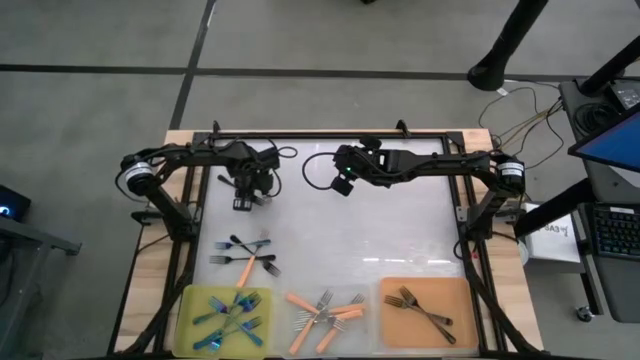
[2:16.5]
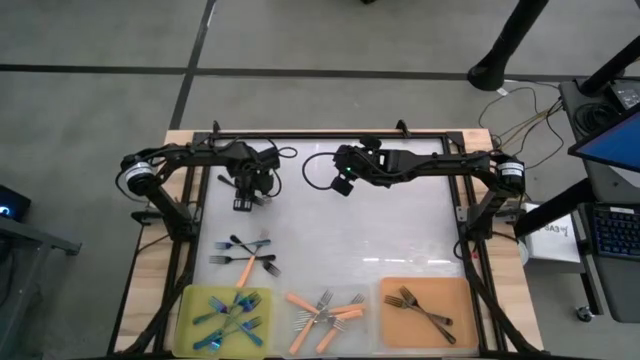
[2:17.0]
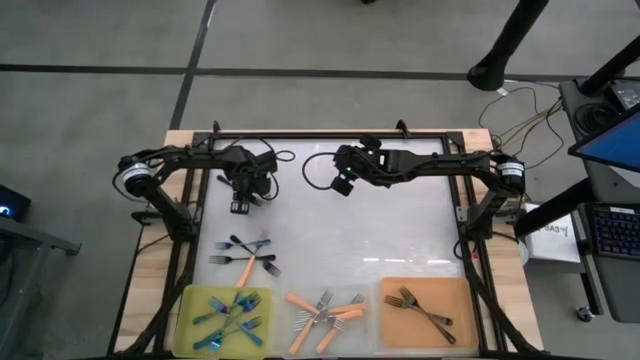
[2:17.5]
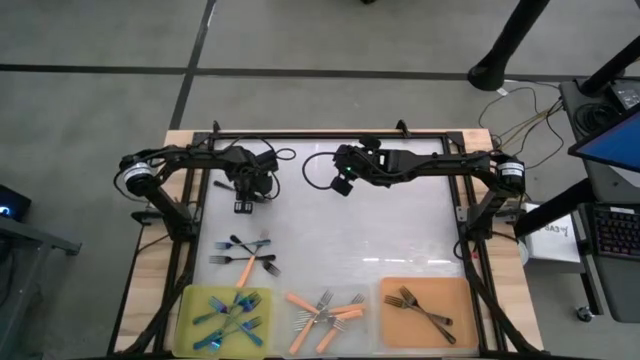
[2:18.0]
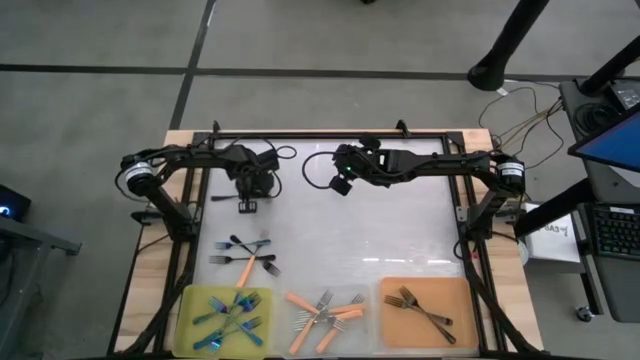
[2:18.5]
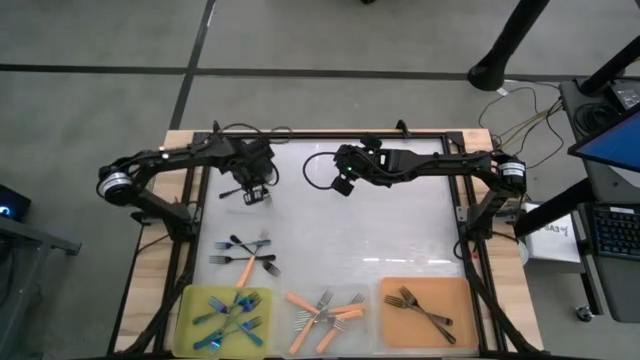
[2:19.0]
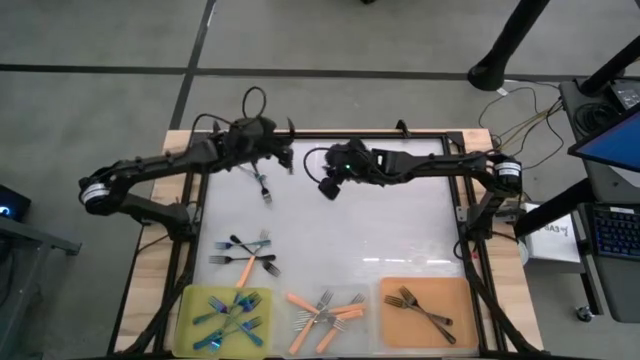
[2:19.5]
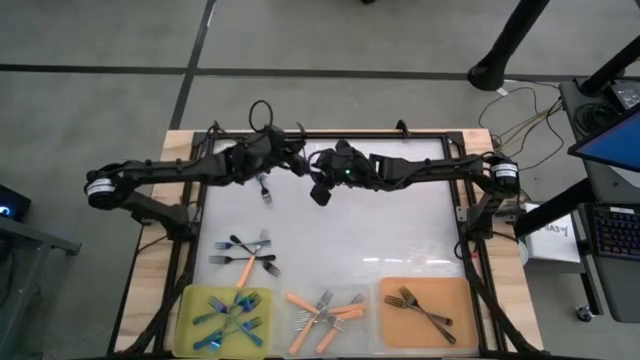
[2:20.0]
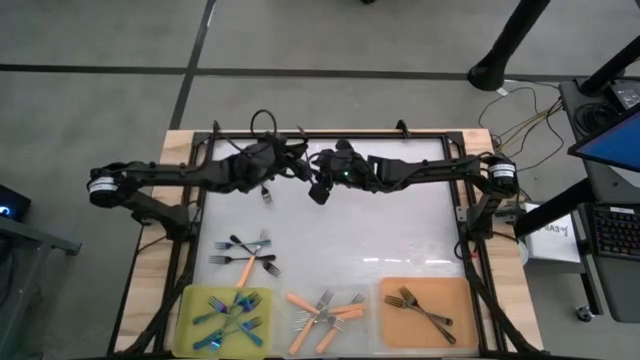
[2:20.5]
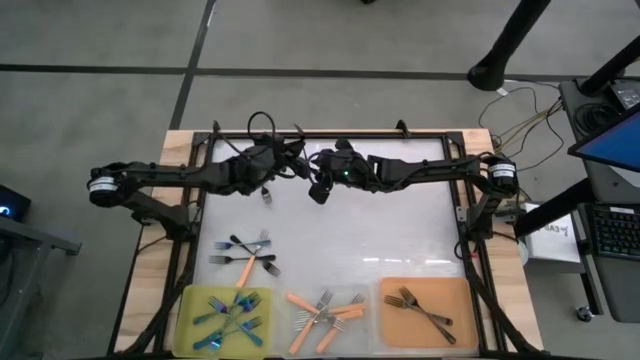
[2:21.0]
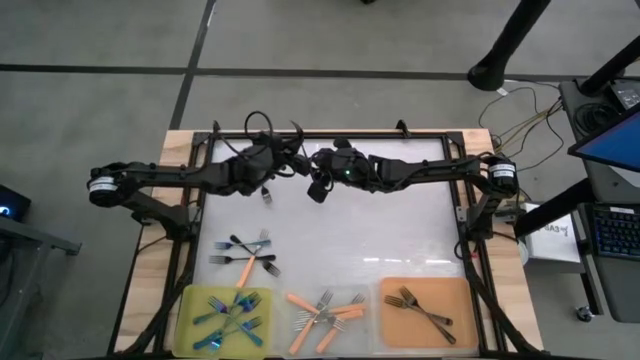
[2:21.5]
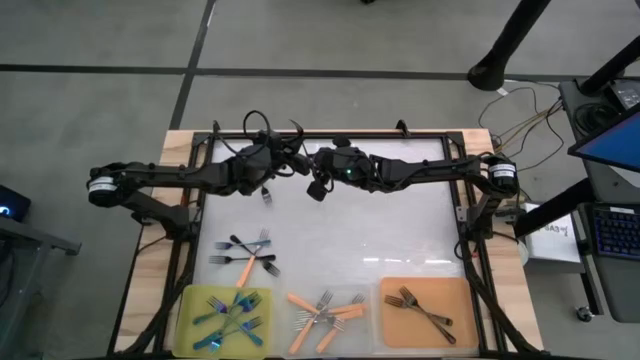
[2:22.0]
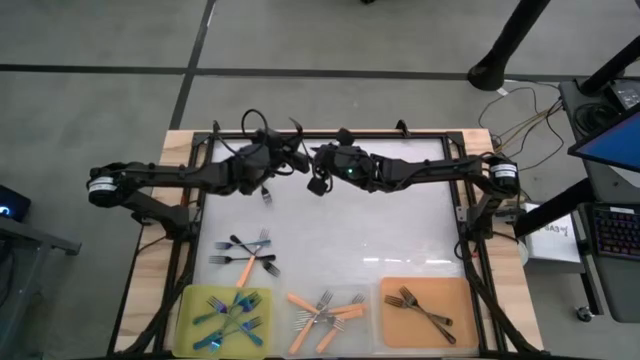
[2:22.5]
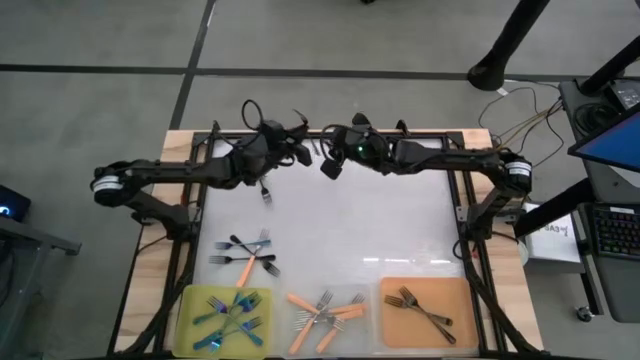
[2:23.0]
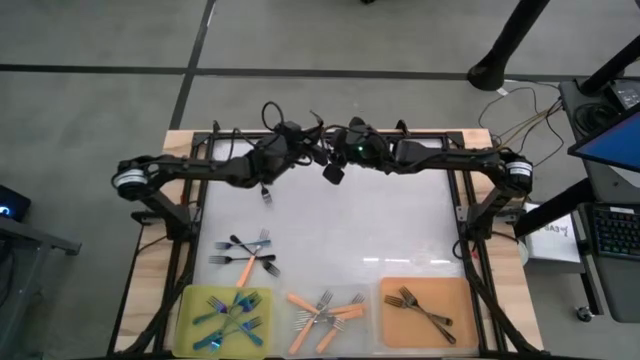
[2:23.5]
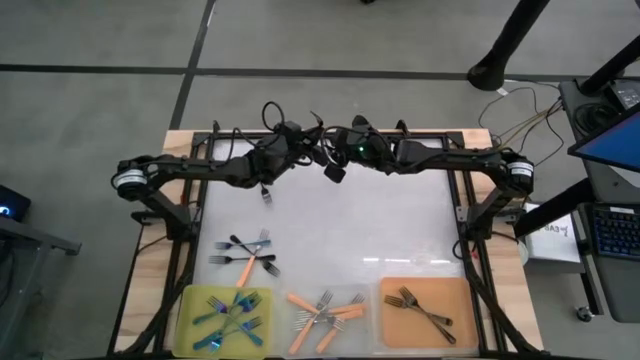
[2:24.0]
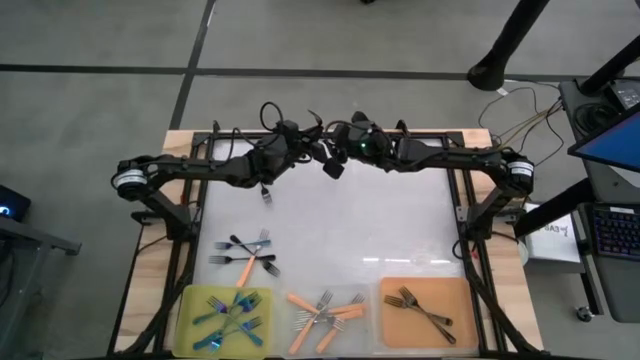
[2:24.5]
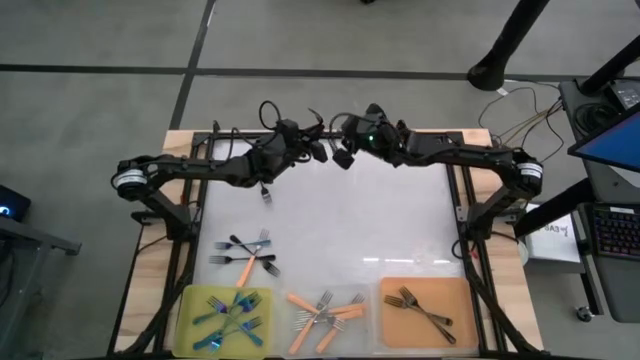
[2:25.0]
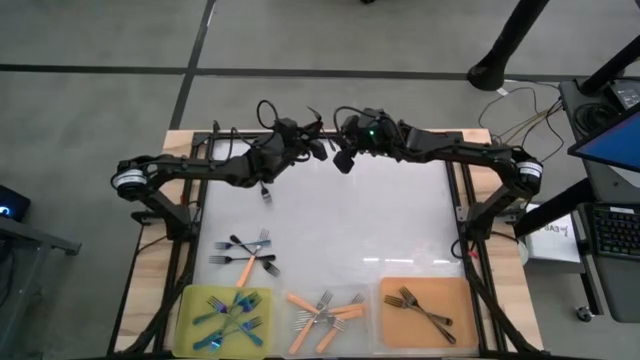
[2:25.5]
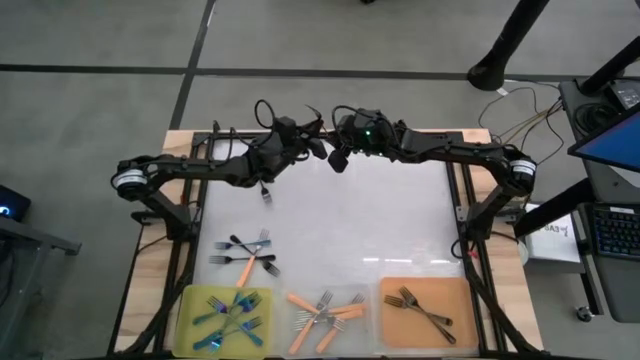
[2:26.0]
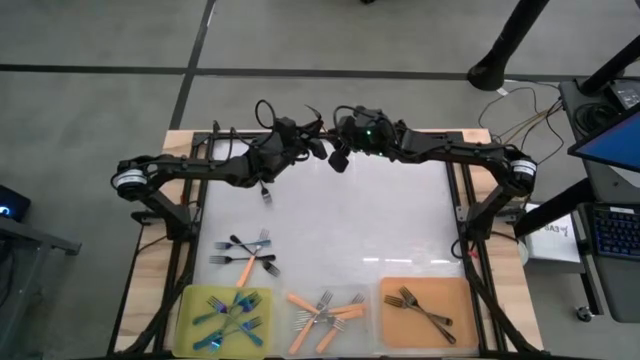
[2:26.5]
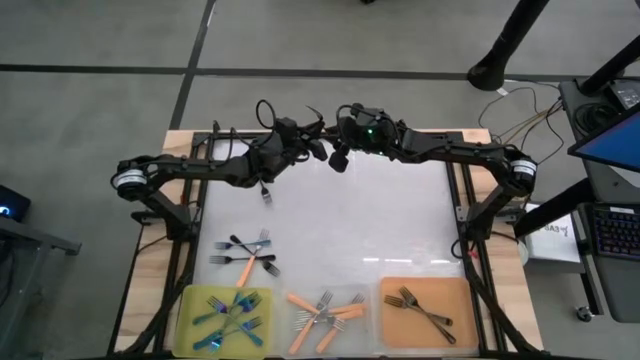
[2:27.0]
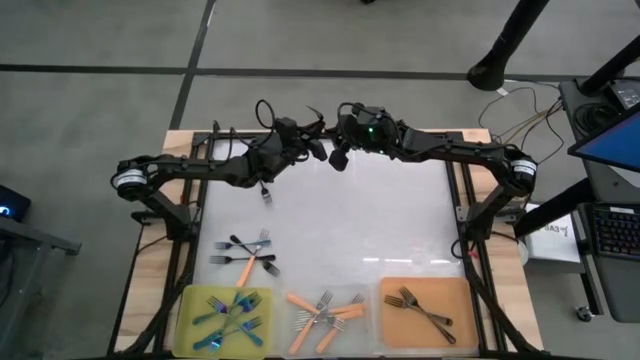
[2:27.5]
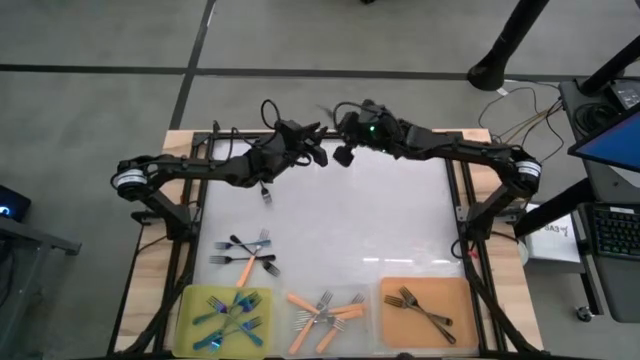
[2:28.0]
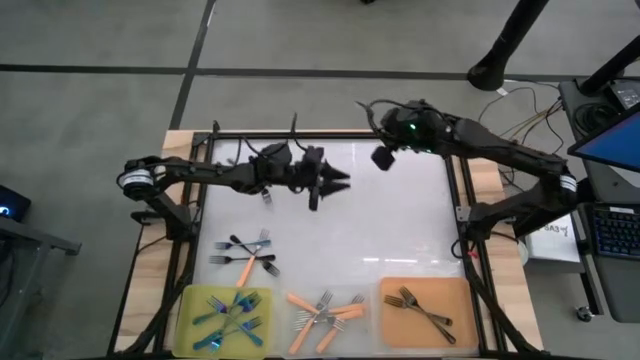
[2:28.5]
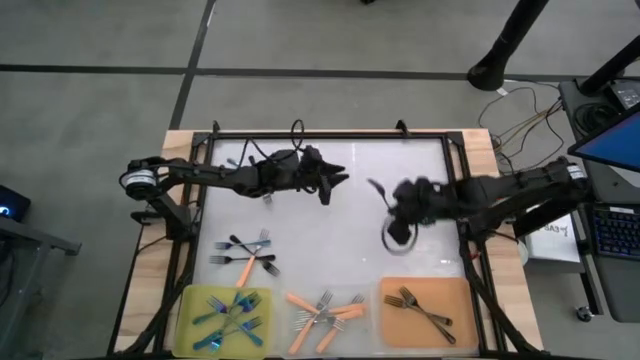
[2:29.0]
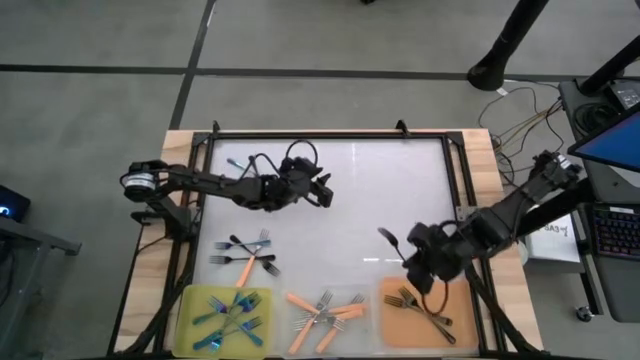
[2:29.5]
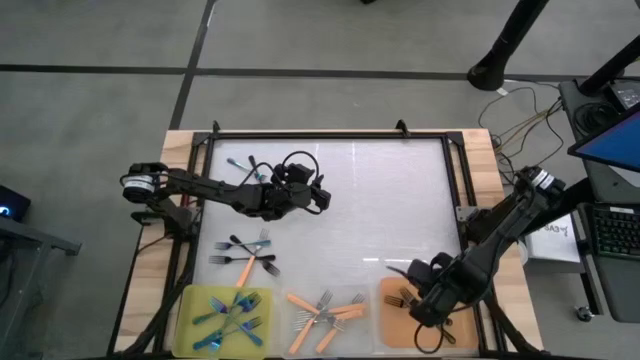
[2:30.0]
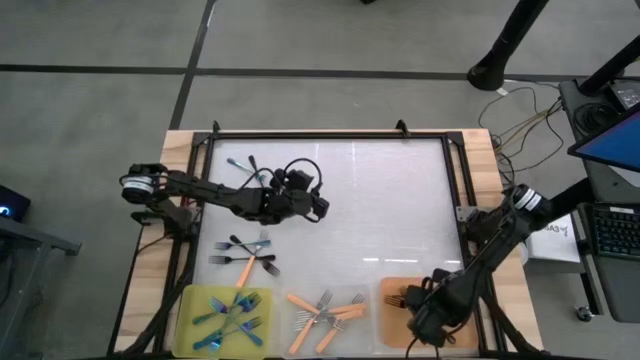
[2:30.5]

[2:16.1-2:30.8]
Task: Sort silverware by color (type)
Put the black fork into the orange bin

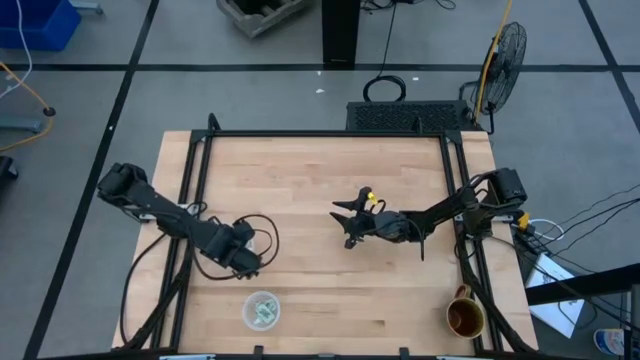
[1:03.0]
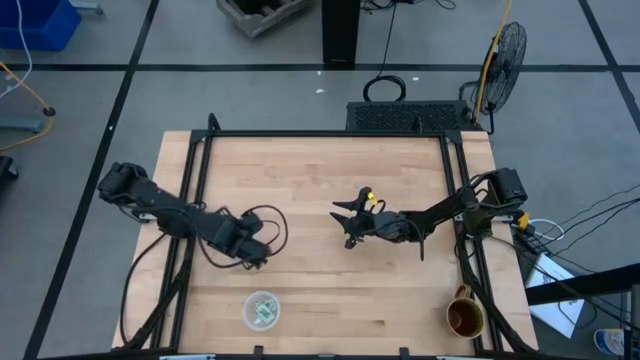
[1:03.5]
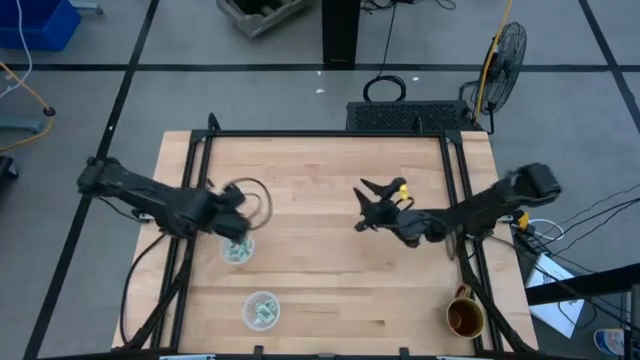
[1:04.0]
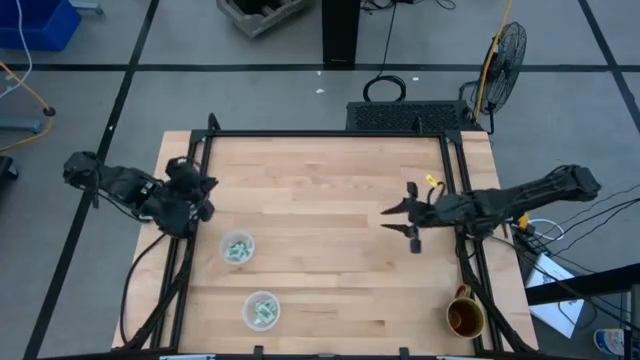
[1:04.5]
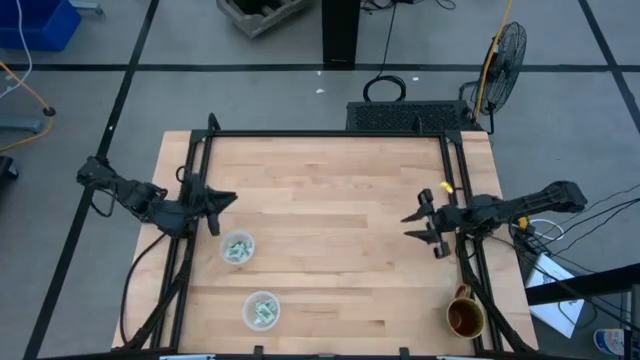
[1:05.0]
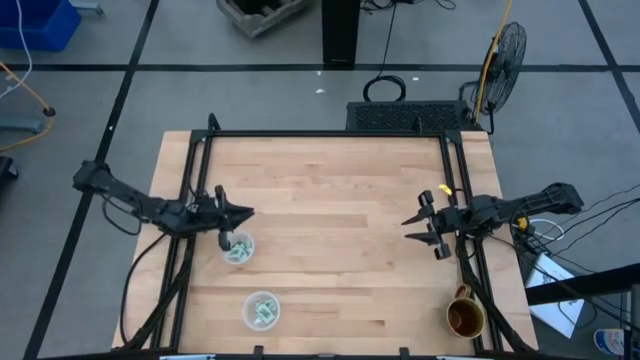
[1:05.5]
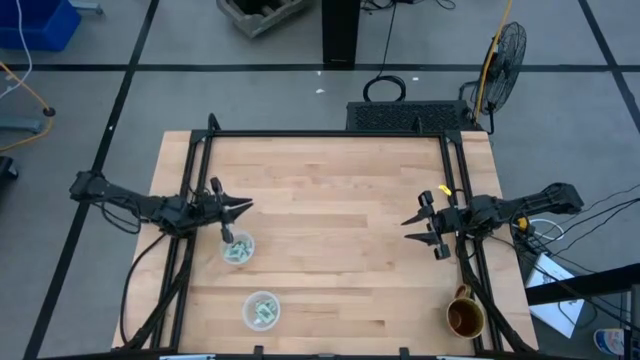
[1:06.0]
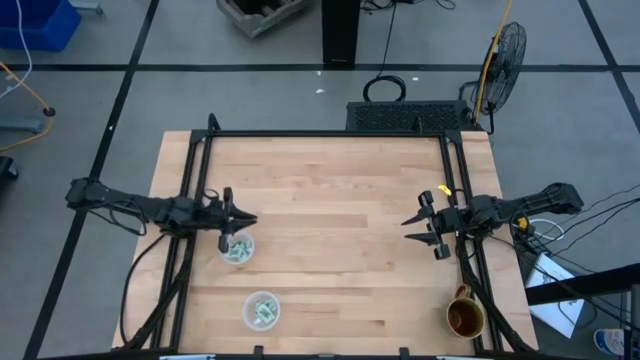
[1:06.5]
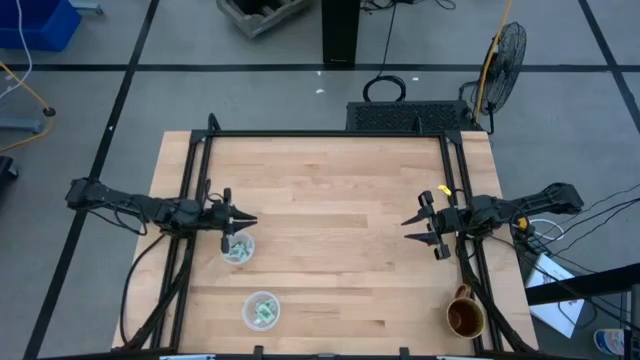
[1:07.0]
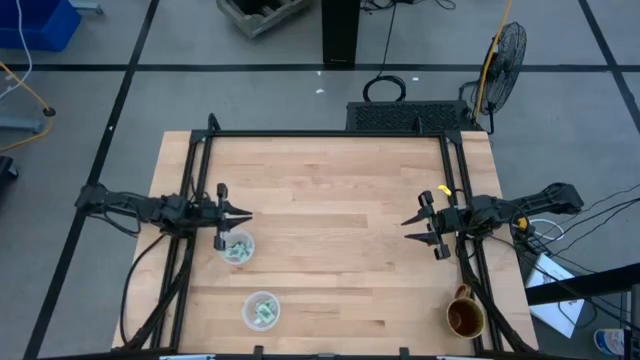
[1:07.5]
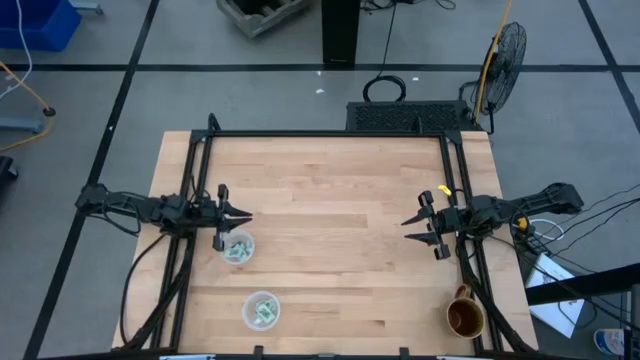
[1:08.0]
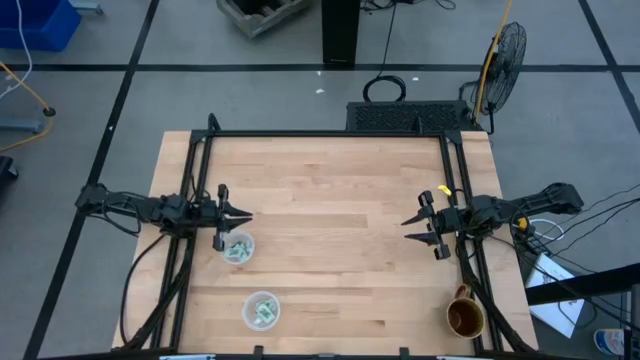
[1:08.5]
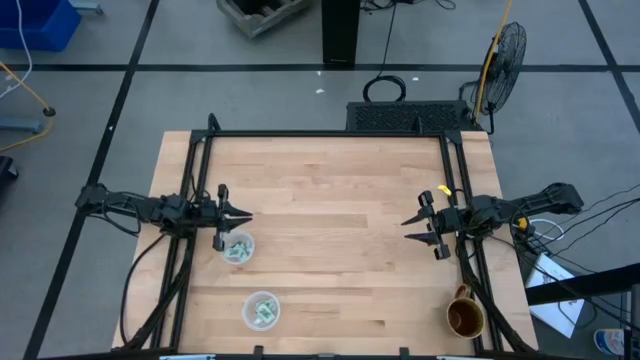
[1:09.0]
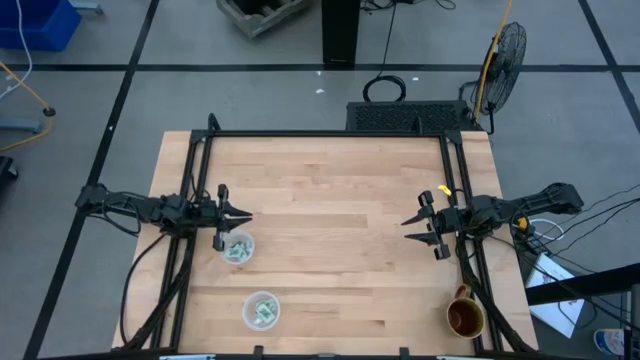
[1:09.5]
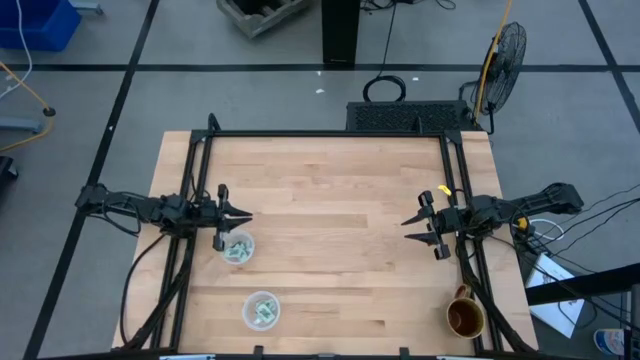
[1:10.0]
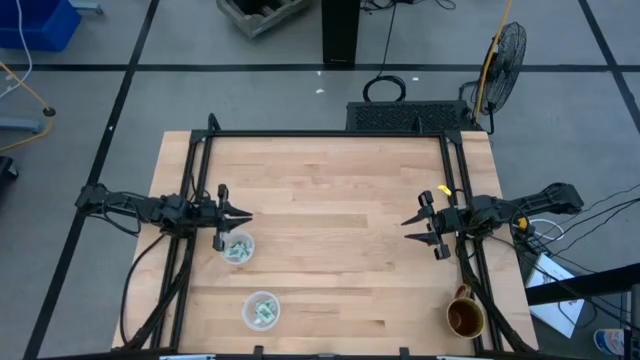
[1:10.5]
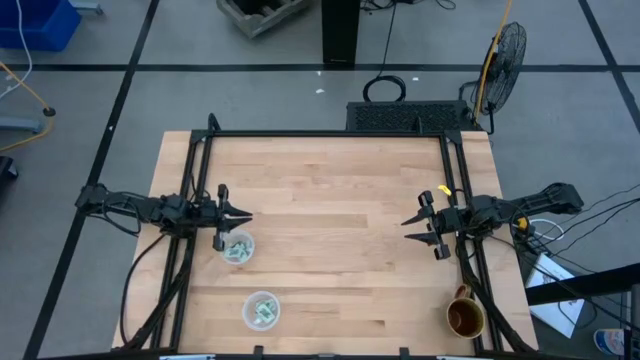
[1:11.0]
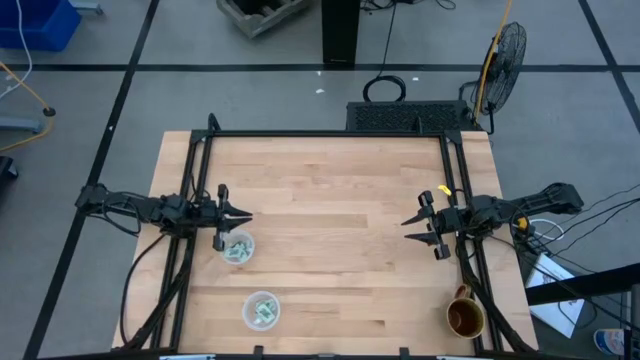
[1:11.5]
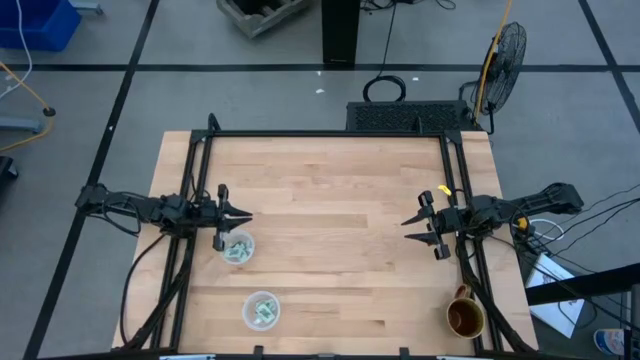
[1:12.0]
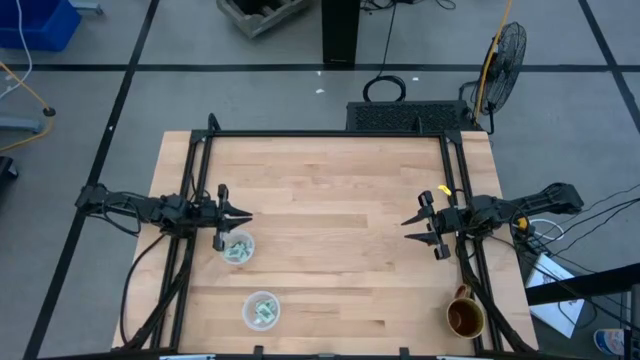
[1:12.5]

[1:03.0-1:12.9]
Task: Pick and place Stevia / Truvia into bins
Return to Home Position
